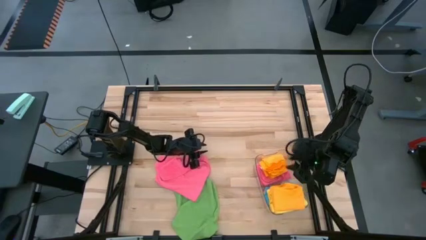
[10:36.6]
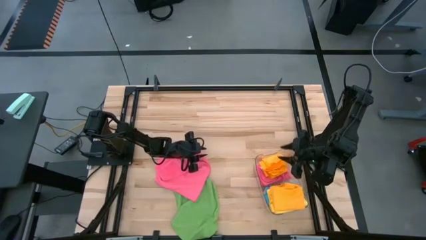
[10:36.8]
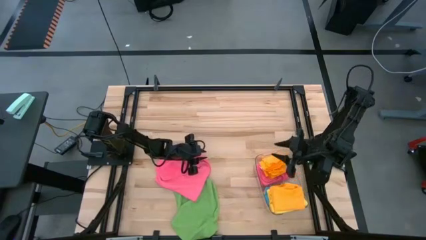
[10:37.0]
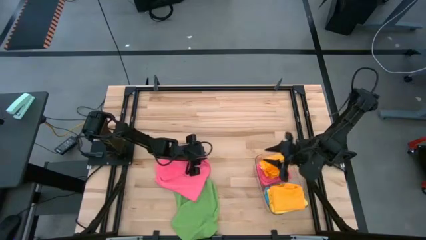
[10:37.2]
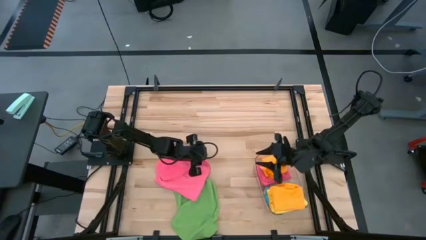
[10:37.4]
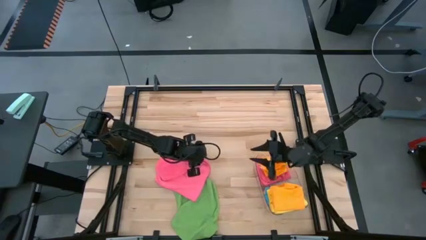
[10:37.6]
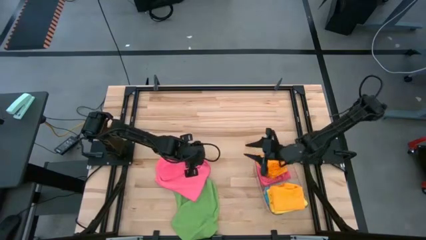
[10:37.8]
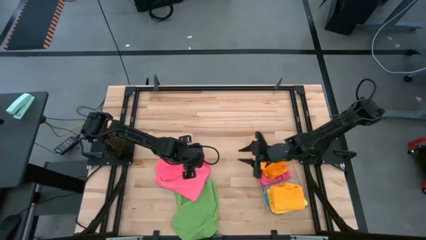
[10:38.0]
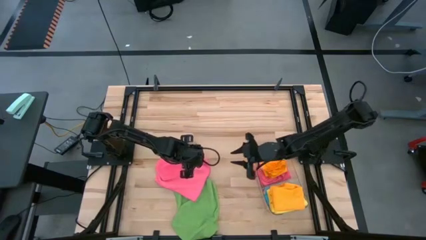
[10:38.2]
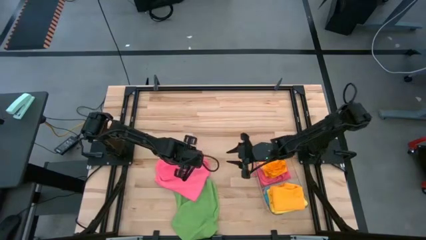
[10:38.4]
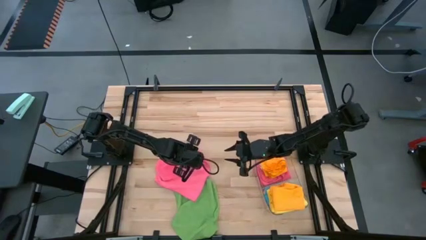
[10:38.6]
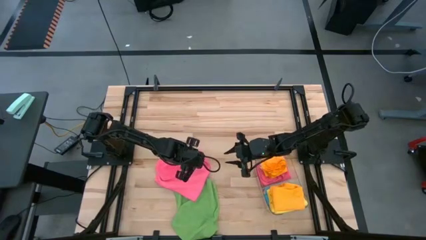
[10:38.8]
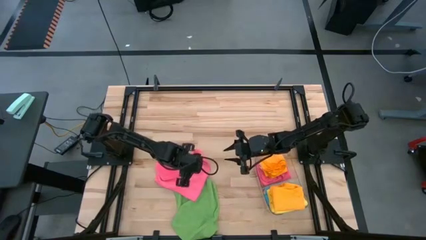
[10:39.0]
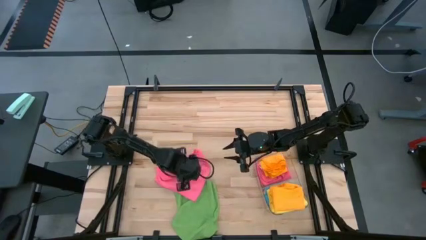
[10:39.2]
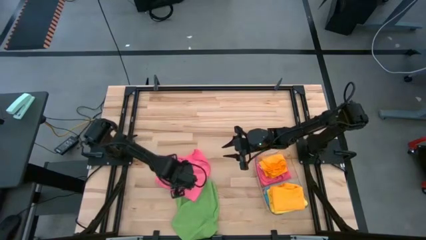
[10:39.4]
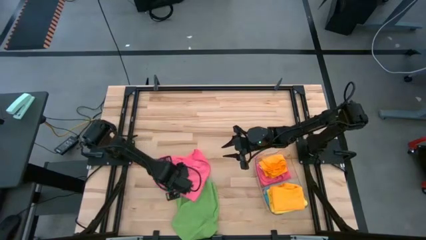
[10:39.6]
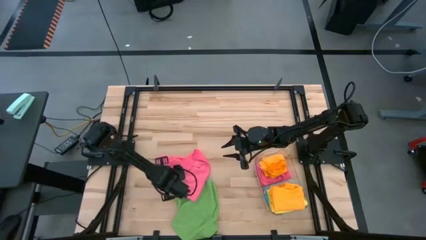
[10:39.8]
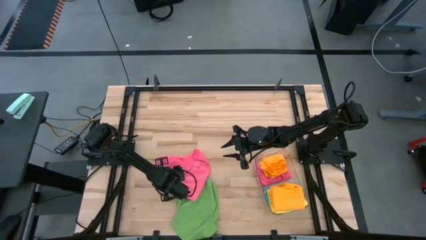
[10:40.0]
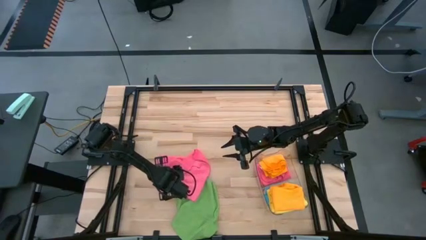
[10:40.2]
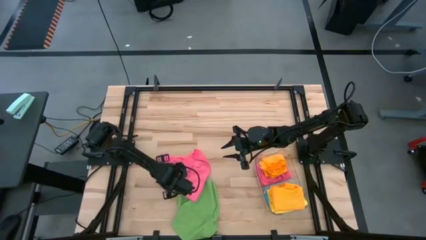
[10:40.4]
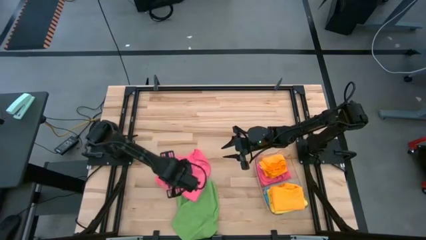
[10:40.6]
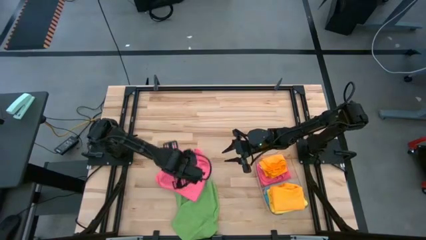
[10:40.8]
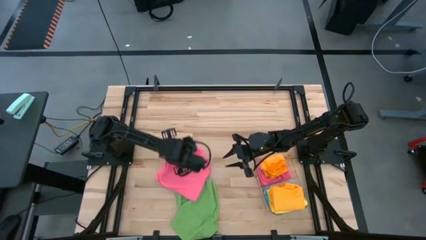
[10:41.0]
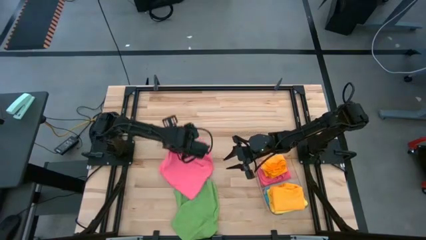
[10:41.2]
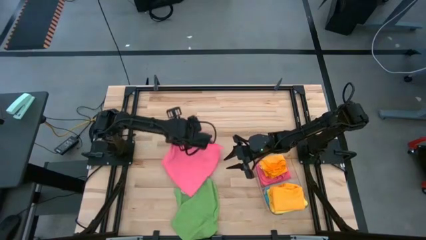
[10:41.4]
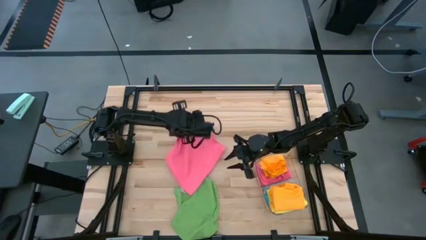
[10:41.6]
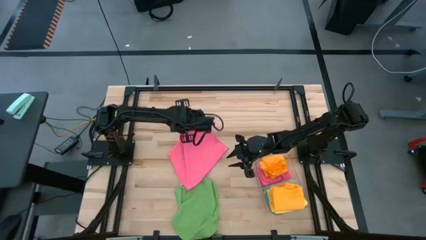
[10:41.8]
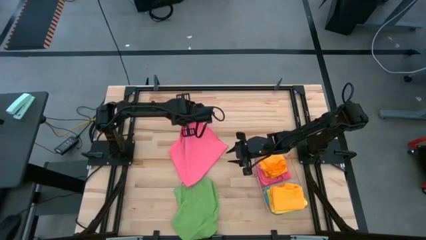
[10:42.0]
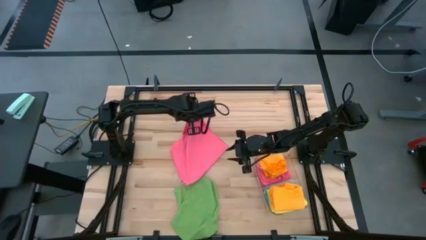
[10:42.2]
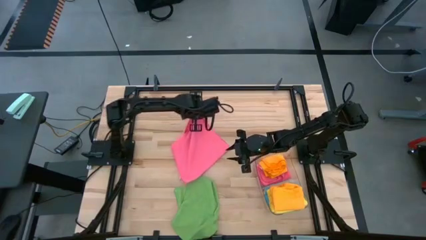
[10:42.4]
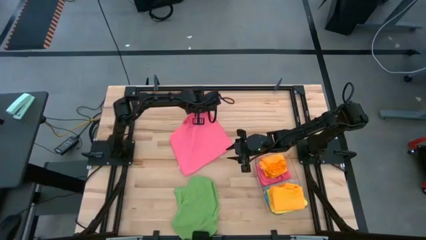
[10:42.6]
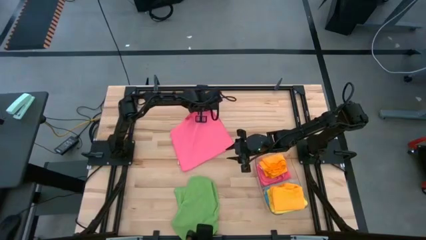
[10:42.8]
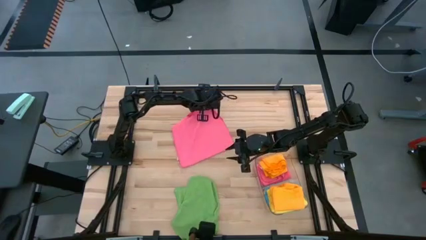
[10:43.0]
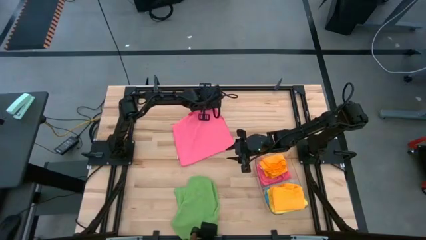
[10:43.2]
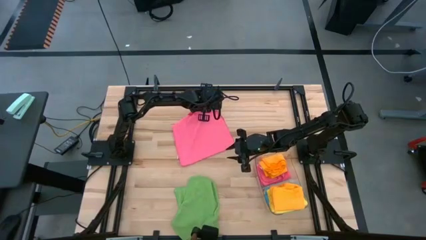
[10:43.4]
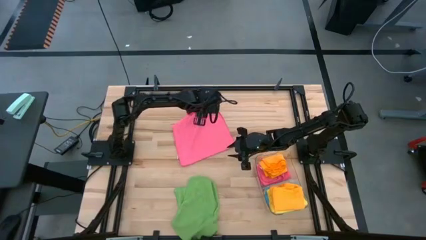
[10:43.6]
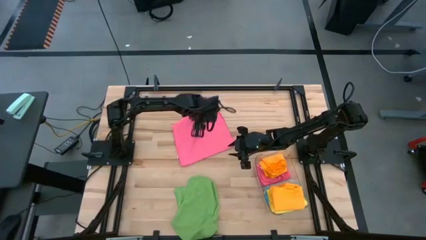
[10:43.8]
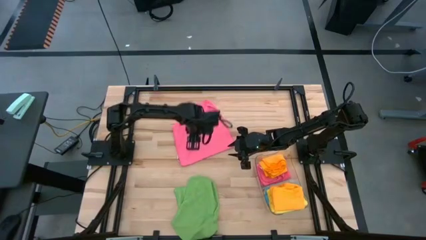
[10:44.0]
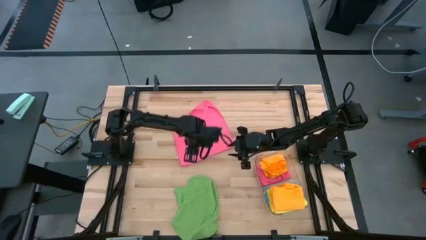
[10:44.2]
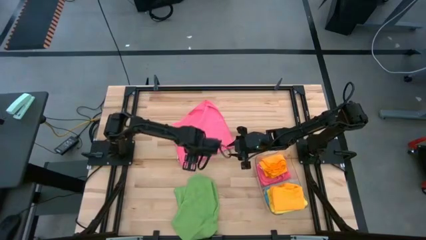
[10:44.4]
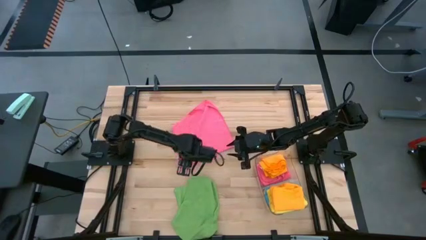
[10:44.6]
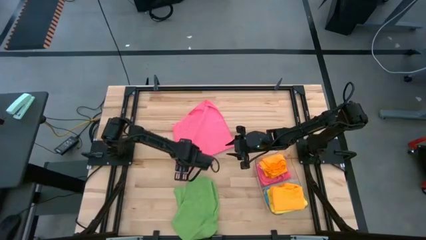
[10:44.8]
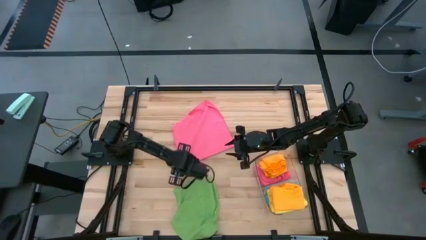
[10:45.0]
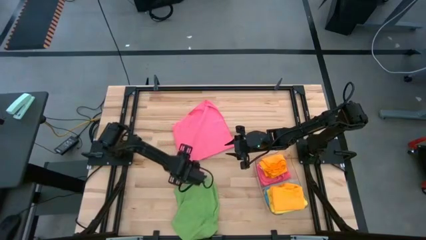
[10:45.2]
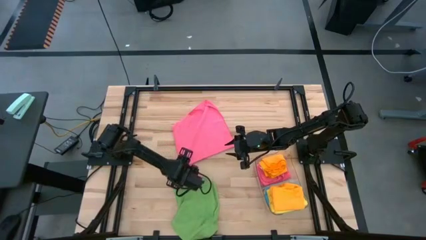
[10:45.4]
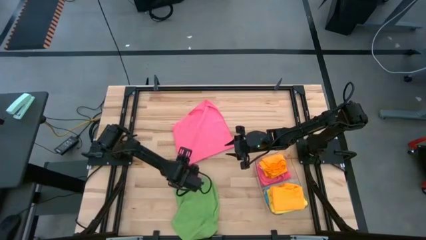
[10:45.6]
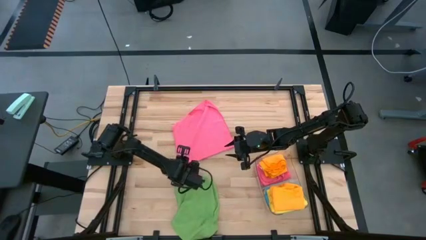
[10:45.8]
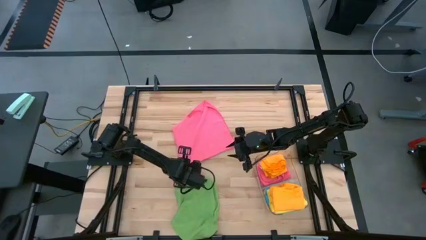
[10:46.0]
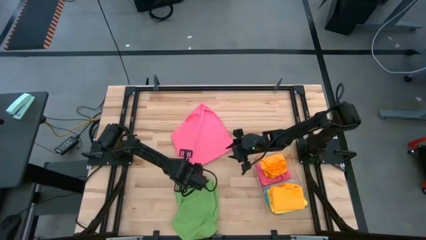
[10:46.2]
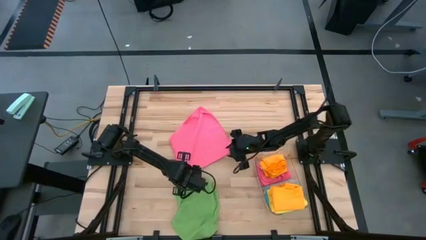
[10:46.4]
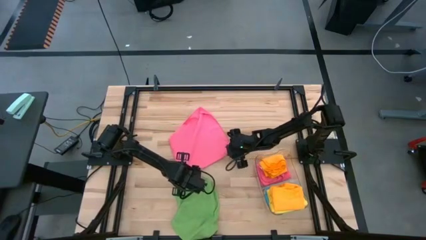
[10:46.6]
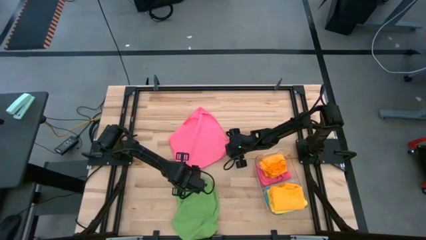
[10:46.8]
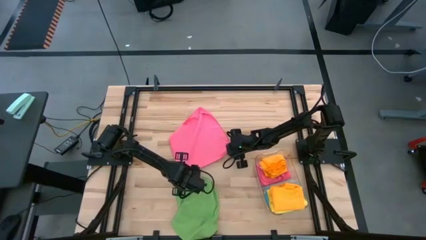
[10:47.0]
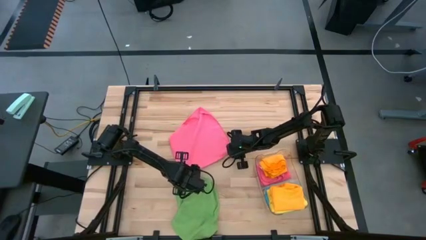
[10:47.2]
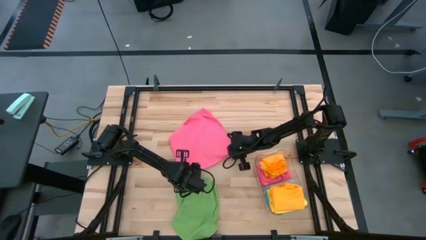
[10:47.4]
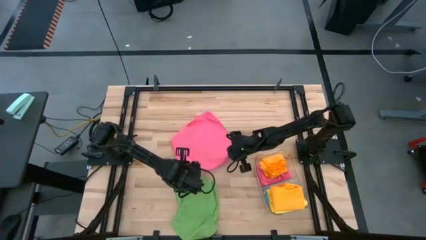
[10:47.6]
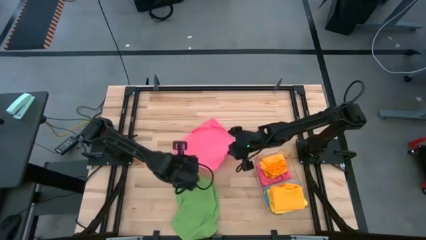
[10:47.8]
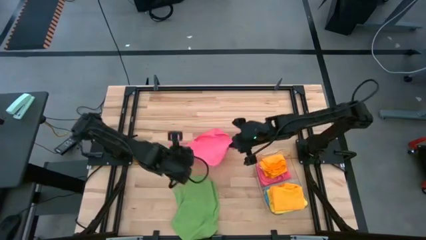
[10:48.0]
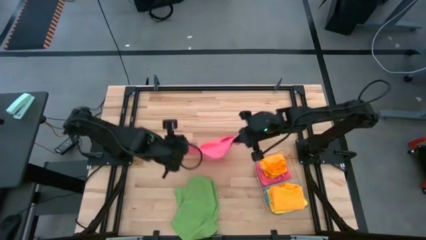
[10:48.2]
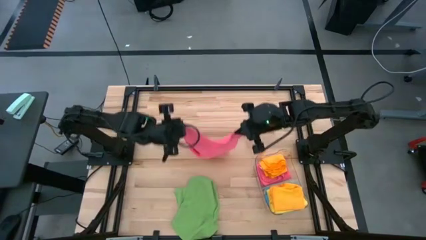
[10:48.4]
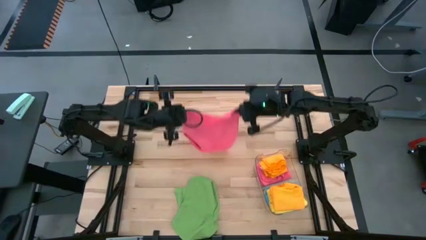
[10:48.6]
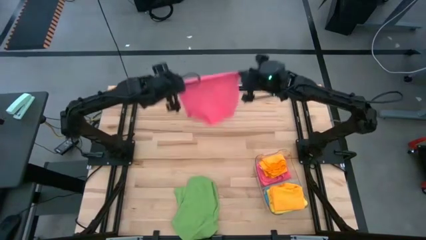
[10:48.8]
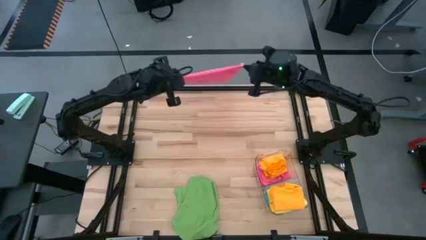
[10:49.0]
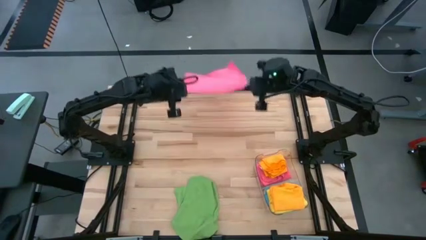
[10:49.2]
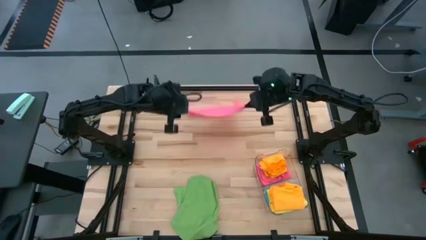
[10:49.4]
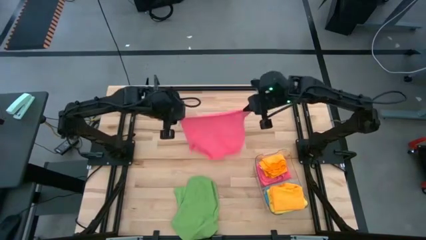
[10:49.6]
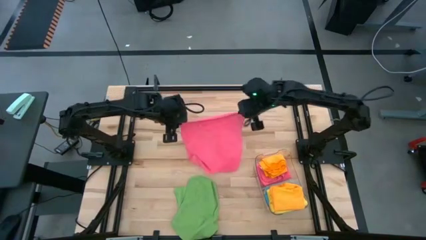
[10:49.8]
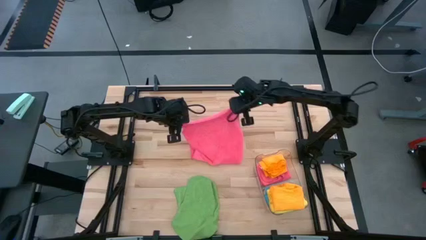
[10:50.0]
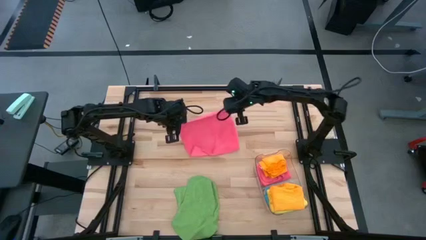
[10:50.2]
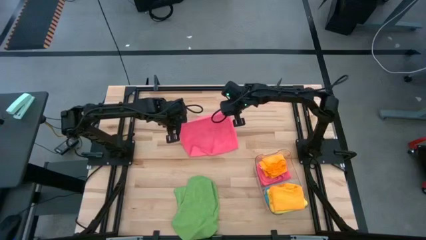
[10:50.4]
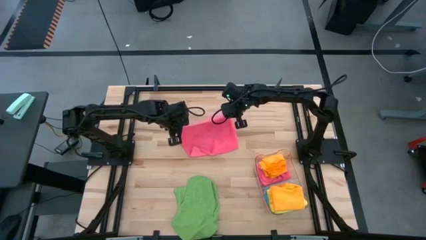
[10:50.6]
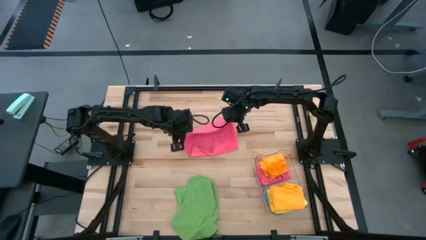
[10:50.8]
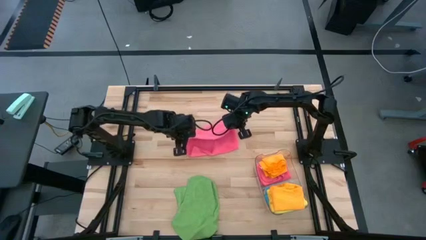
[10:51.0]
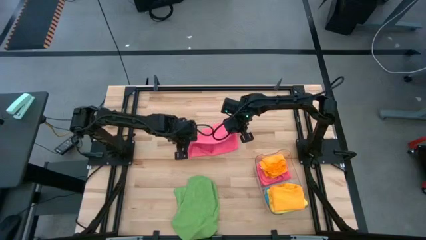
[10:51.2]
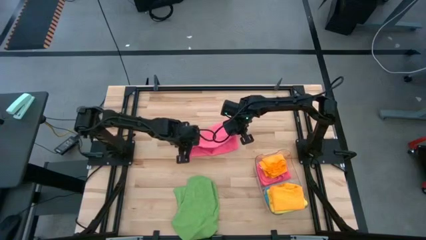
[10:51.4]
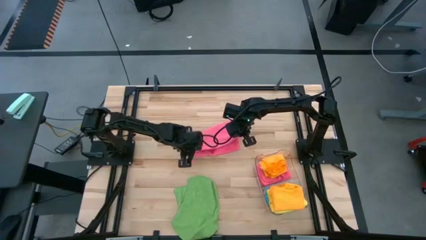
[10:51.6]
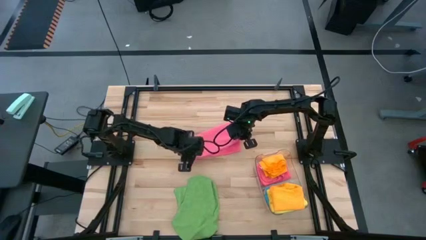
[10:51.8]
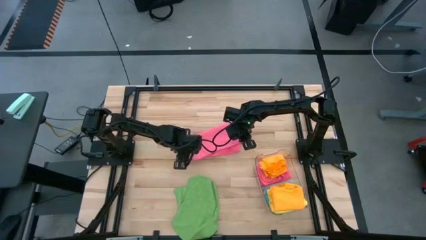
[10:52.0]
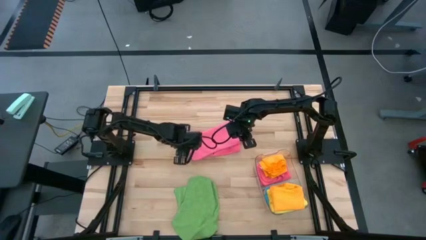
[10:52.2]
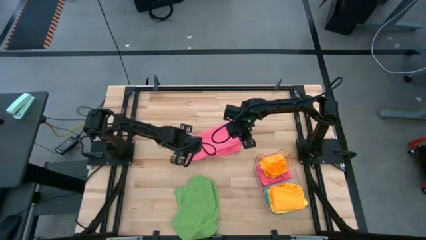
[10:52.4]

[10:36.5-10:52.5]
Task: Fold microfiber towels
Fold the pink towel
